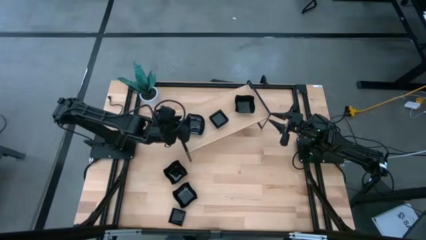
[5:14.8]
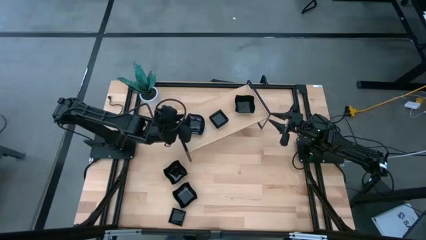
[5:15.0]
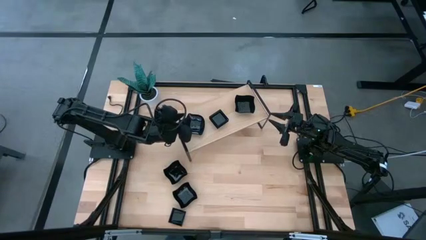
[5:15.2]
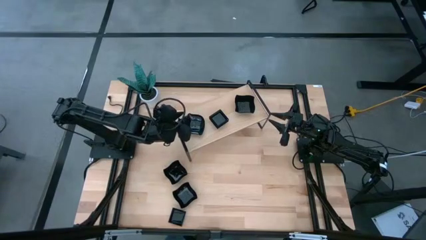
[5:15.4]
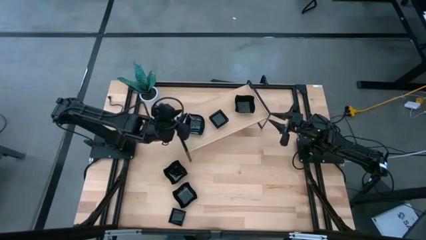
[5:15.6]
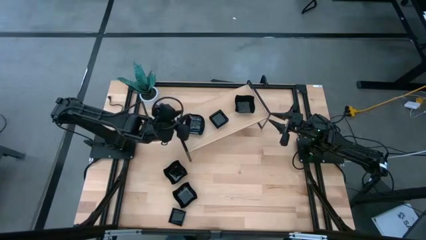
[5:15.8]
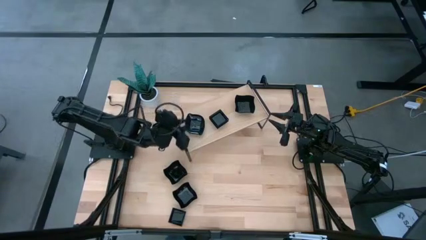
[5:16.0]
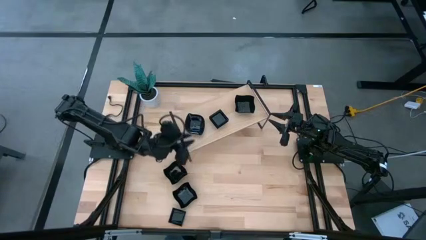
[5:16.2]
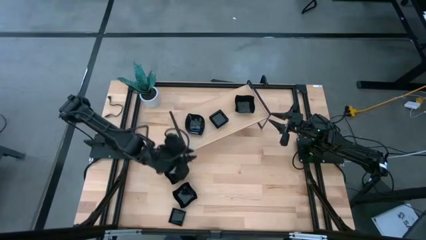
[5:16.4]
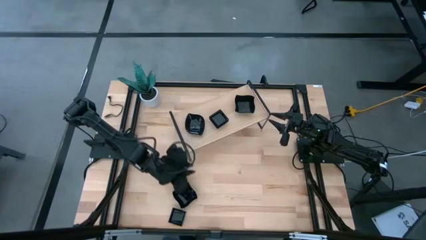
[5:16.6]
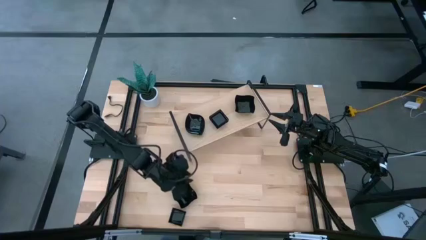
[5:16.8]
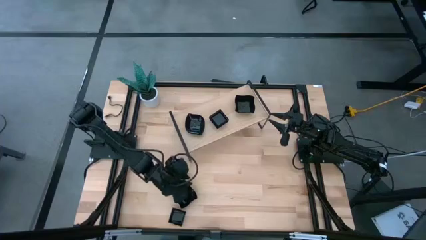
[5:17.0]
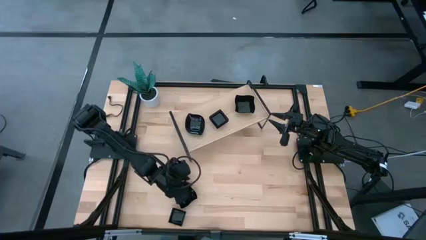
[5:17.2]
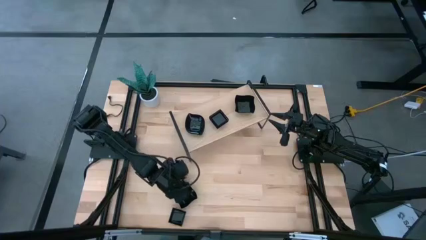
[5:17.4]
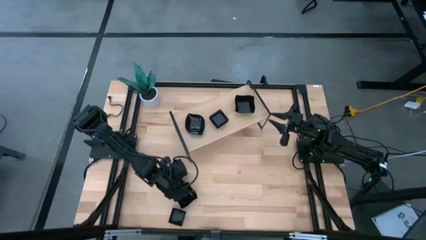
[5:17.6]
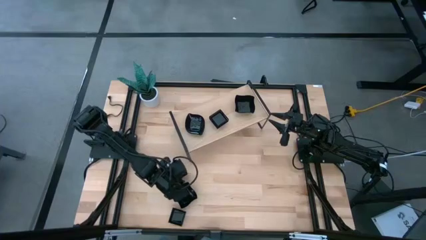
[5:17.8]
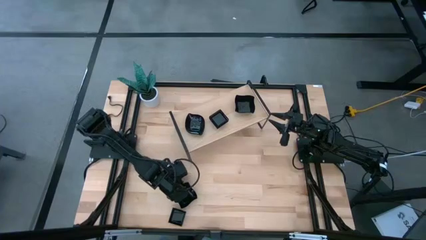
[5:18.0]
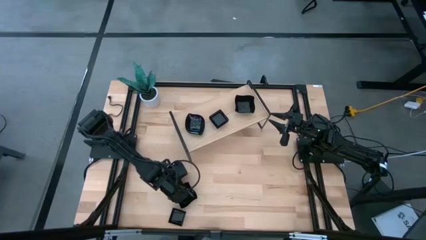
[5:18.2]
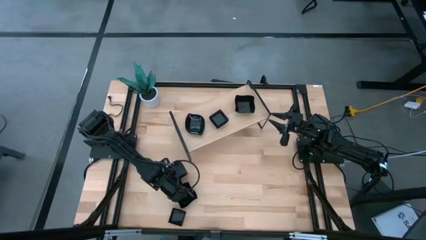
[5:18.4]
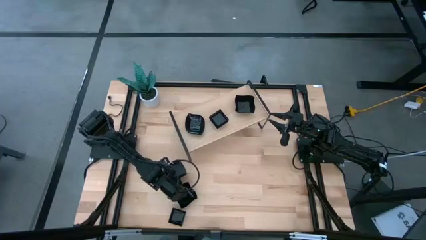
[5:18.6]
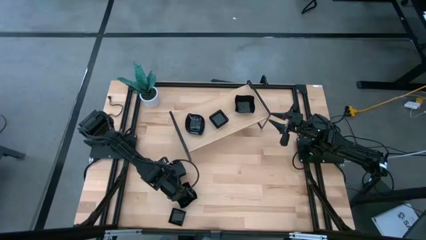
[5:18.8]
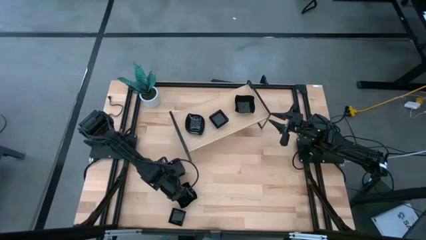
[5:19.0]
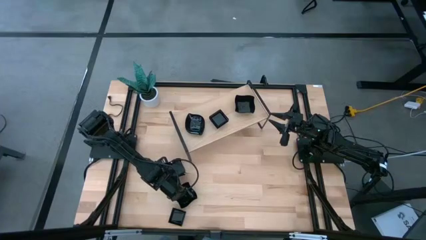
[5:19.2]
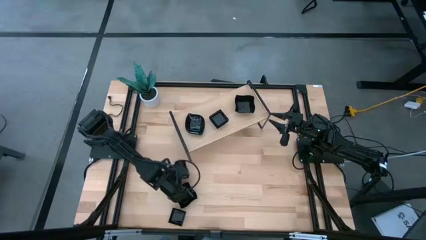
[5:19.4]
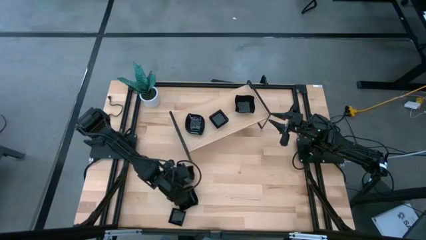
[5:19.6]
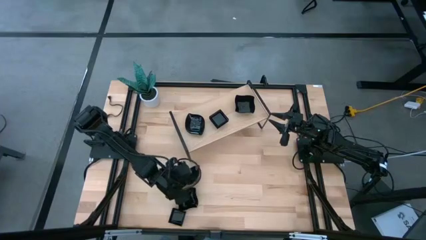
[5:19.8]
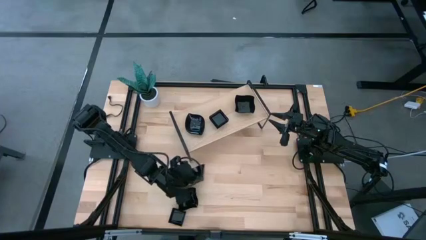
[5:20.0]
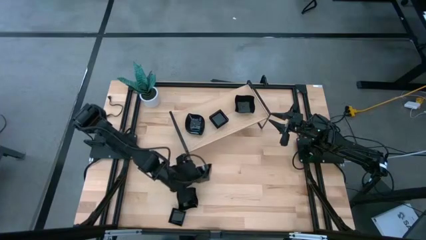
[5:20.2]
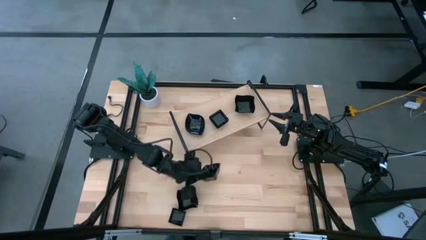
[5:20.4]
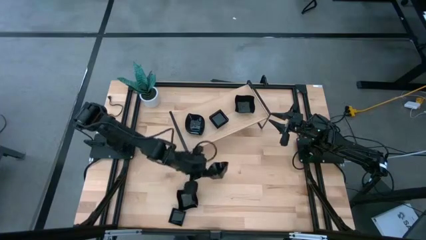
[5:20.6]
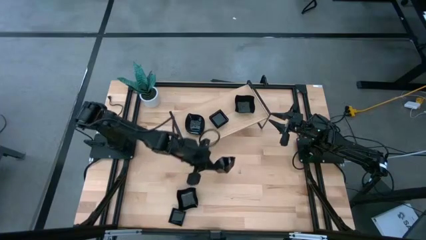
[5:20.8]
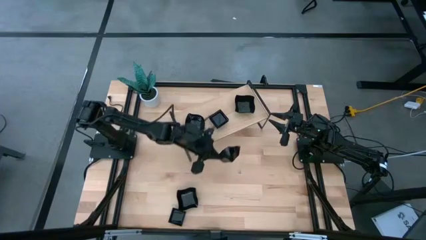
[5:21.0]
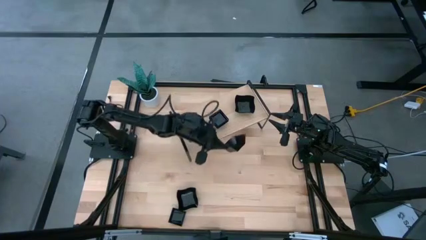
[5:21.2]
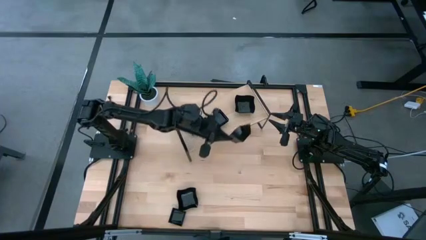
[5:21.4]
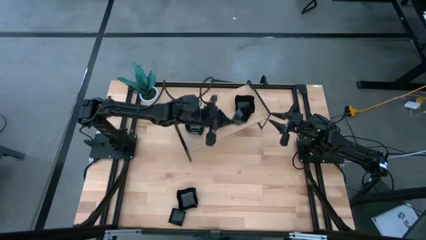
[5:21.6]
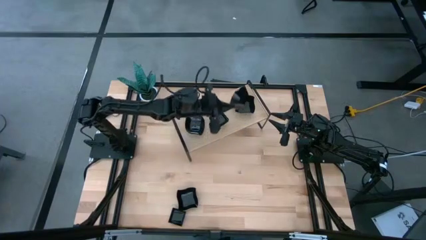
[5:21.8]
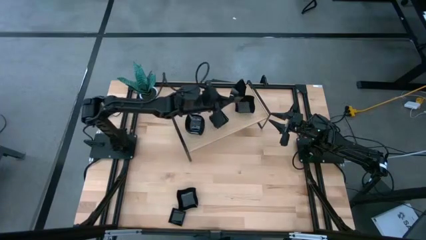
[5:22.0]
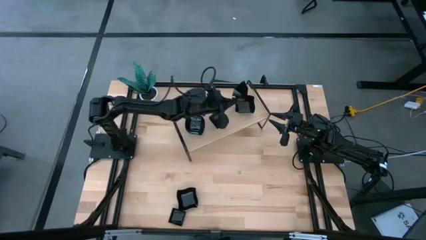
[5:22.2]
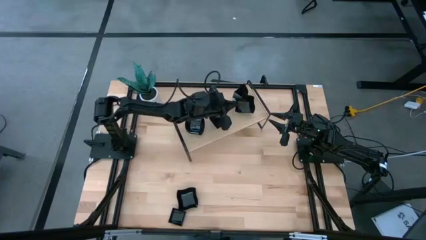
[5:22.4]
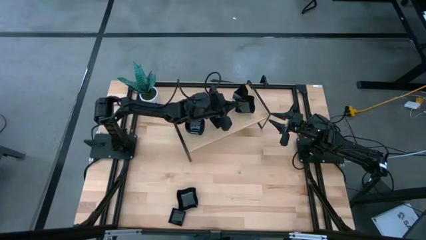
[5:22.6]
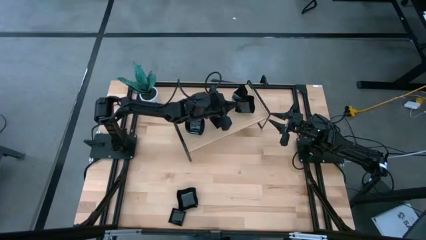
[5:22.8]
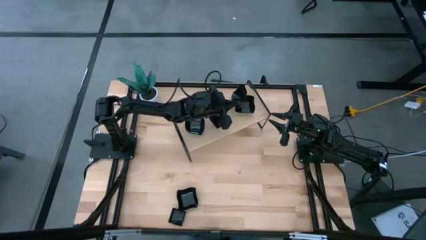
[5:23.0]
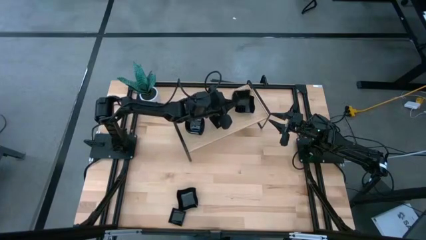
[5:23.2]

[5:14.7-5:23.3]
Task: Pick & Place Mini shaped plates
Stack the black distorted square plate on top of the black distorted square plate on the shelf

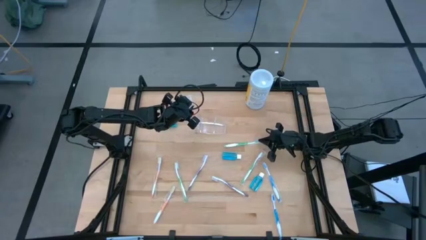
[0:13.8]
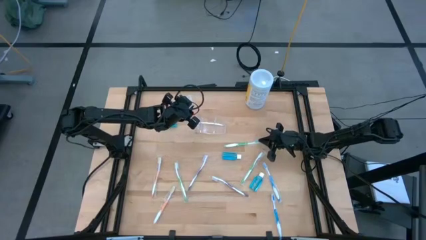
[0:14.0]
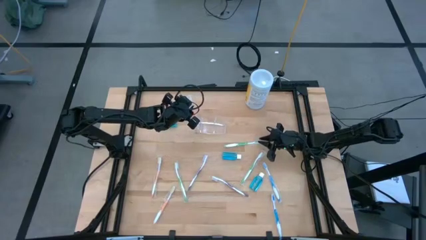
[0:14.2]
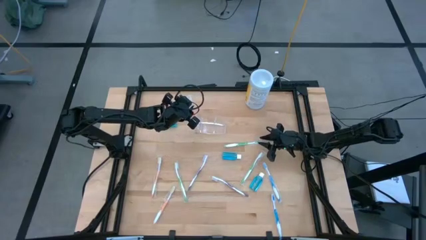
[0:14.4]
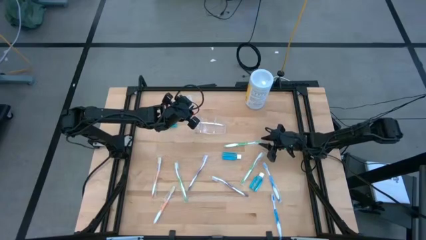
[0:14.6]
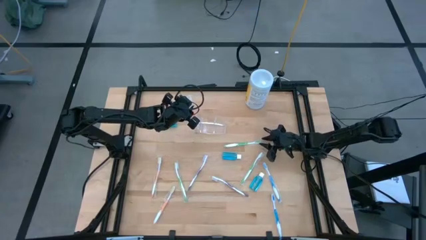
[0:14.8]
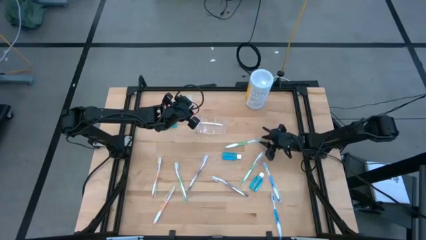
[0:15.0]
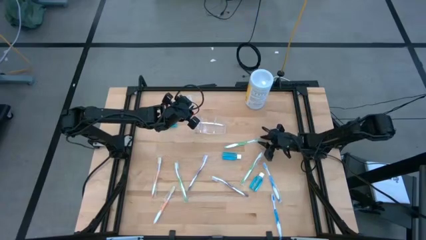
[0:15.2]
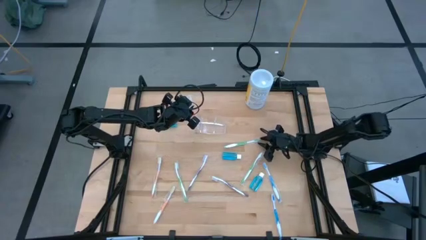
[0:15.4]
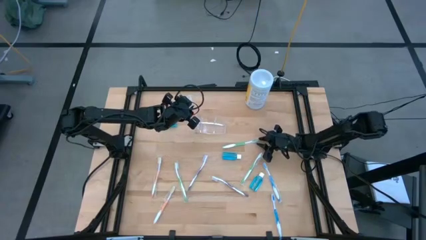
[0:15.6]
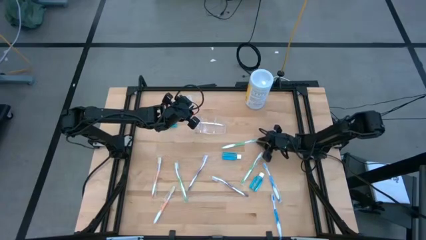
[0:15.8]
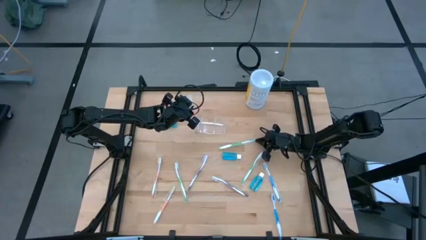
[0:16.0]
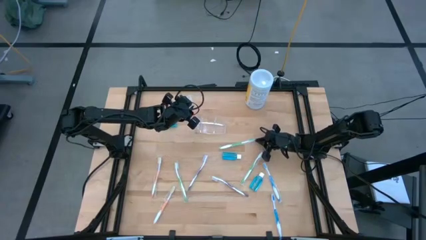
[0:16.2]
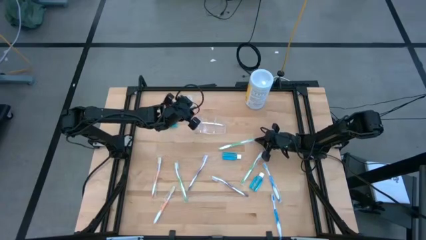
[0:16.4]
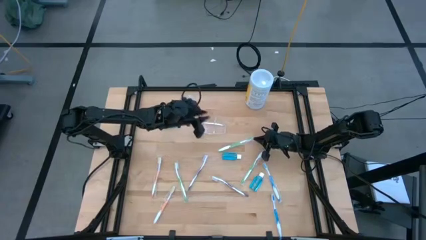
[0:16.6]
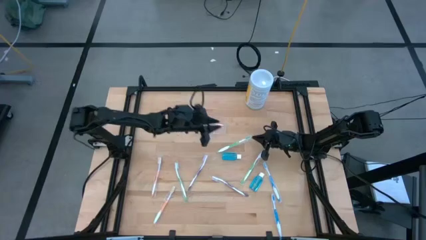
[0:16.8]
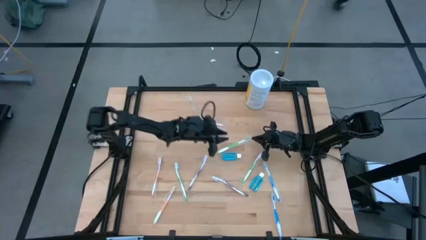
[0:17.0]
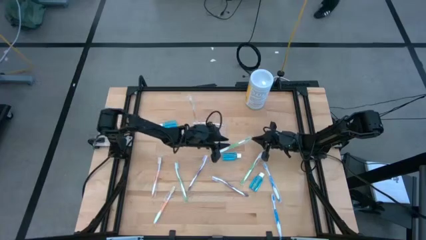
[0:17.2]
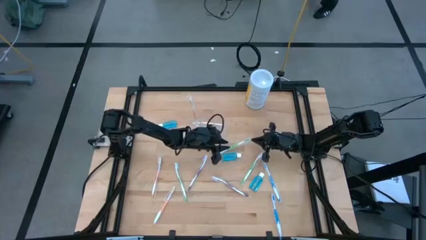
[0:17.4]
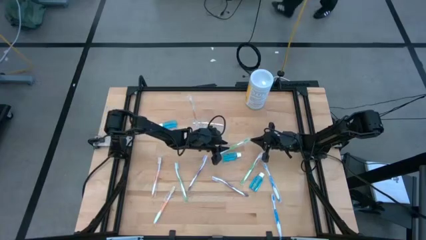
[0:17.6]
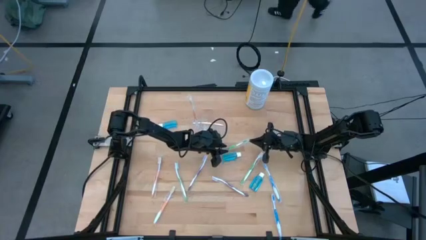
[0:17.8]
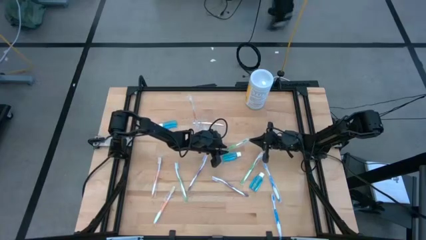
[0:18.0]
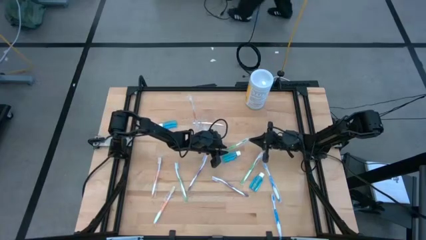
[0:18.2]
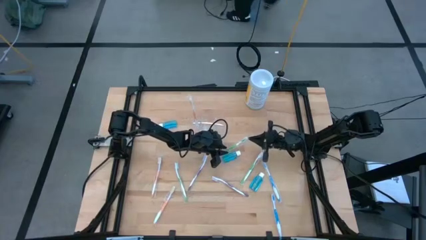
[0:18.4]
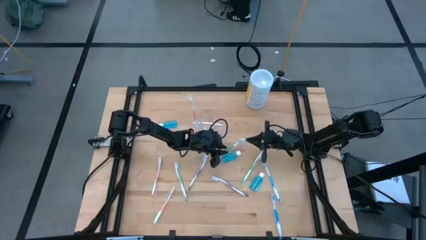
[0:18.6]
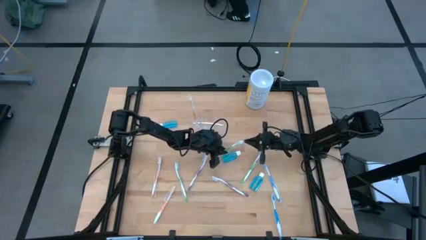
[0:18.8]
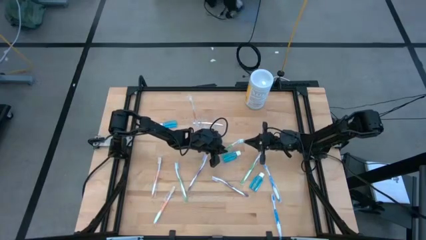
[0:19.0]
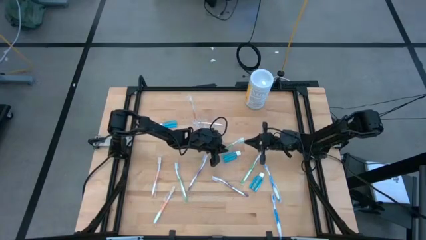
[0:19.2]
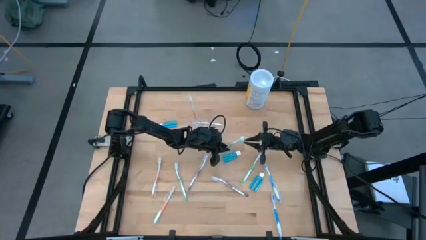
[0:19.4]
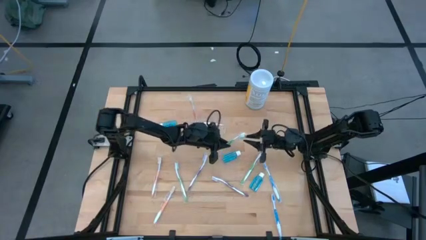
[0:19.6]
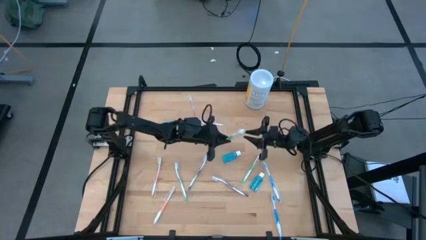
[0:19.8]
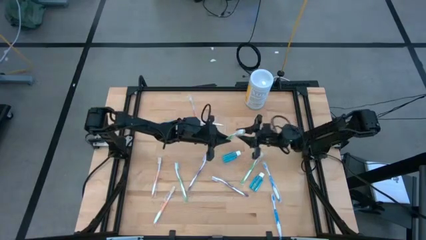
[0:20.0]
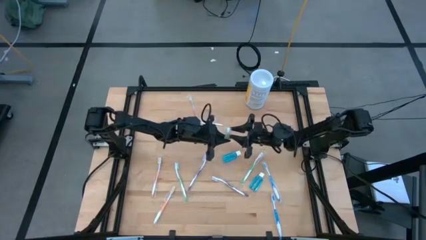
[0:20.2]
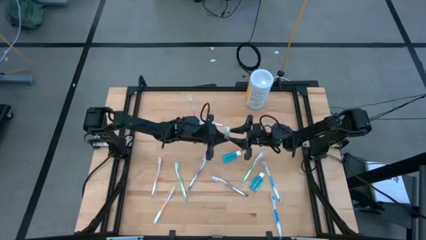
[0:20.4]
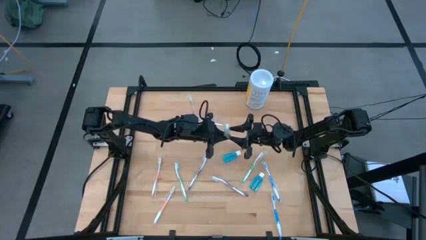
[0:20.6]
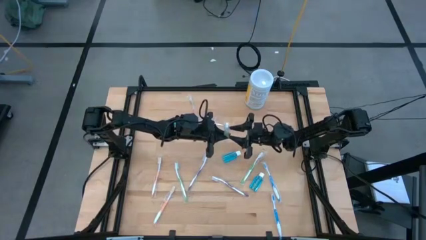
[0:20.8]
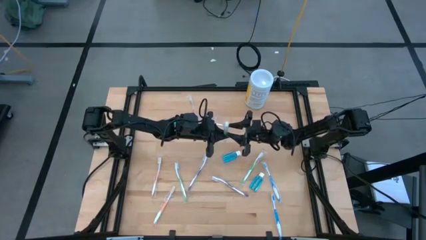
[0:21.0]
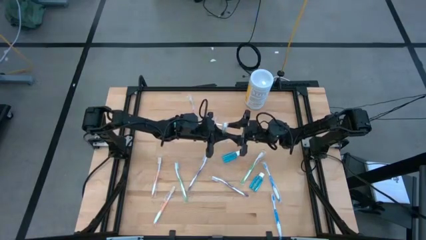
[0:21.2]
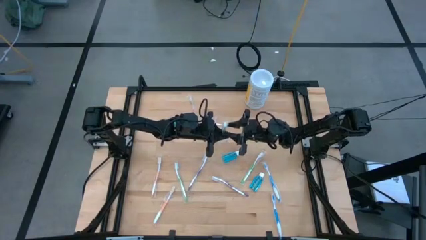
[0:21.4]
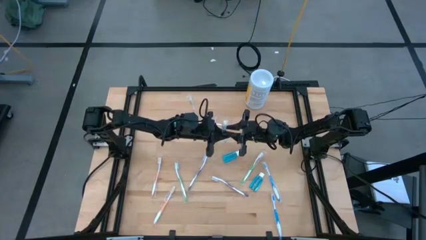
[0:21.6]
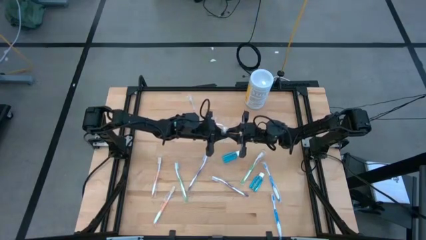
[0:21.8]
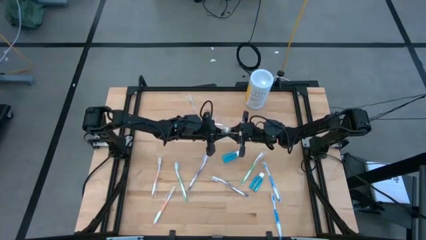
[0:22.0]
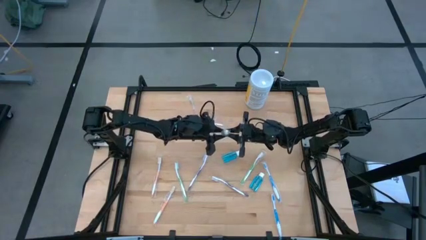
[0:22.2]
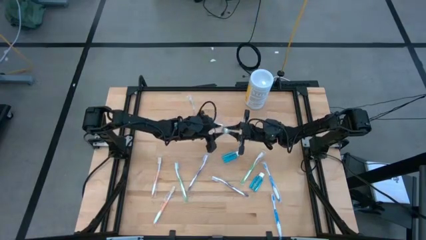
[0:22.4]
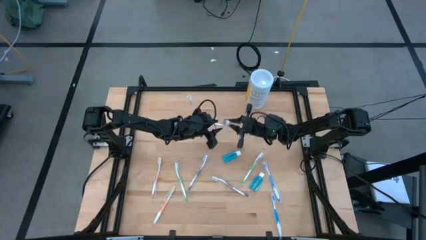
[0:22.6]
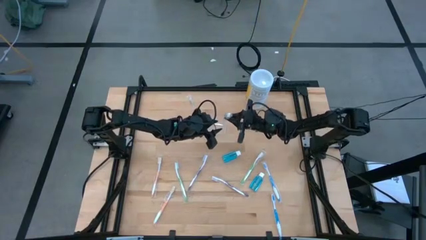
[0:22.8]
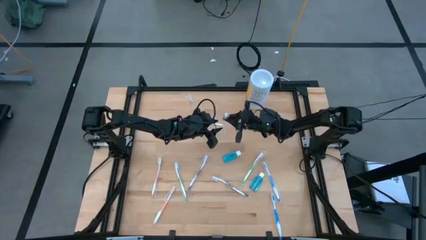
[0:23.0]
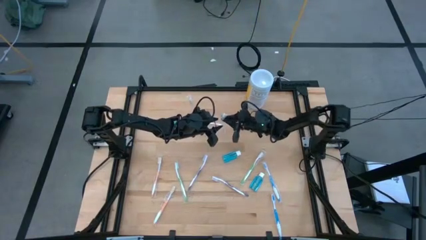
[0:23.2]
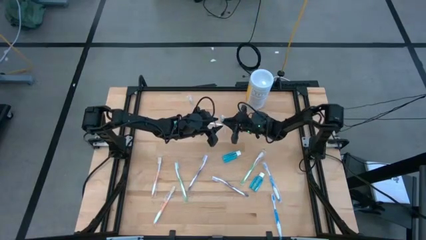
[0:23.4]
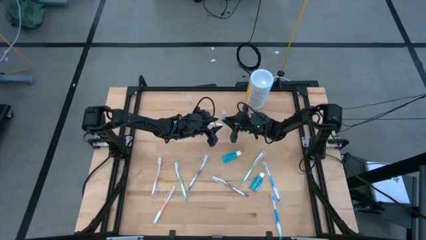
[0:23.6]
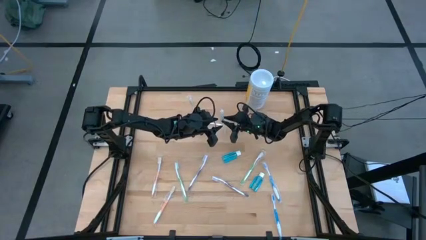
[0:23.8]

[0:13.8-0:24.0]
Task: Pick & Place toothbrushing station
Put the top right green toothbrush into the transparent organizer
